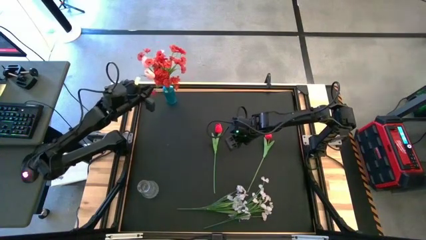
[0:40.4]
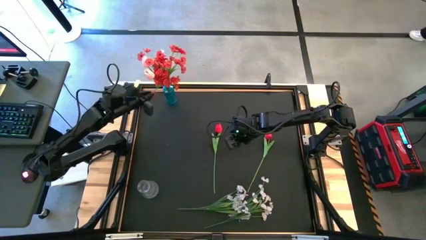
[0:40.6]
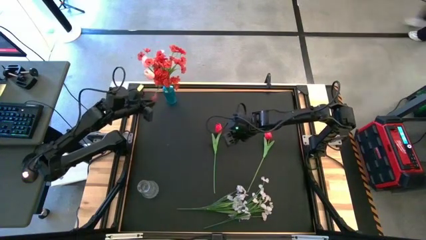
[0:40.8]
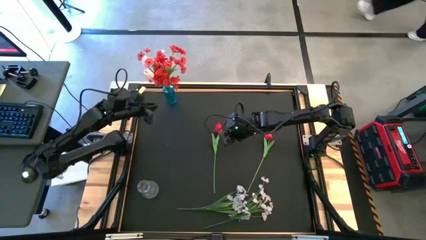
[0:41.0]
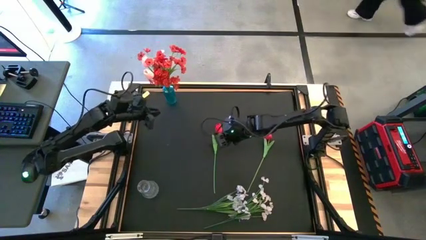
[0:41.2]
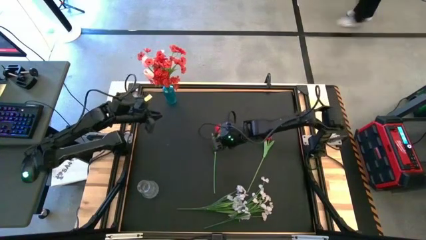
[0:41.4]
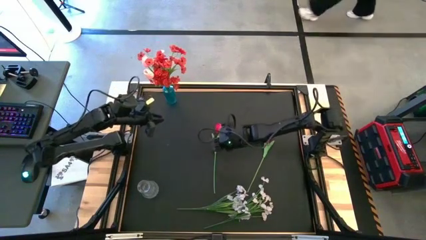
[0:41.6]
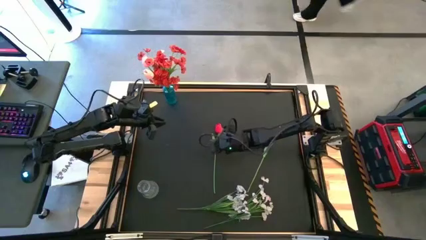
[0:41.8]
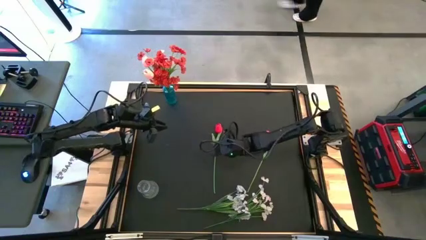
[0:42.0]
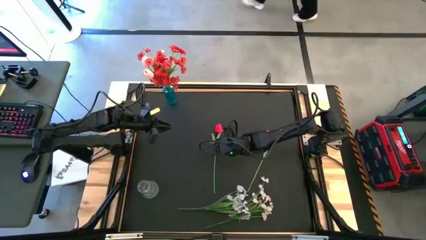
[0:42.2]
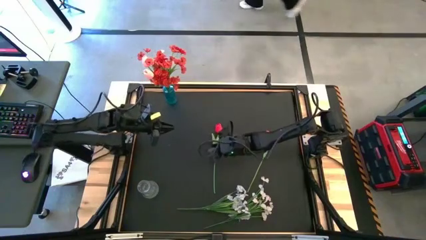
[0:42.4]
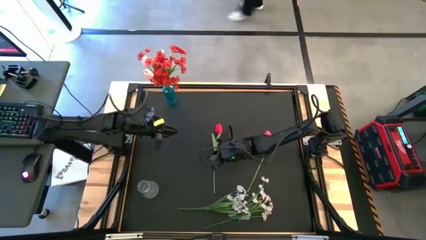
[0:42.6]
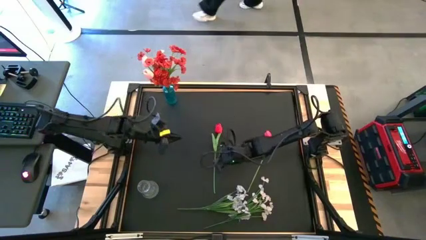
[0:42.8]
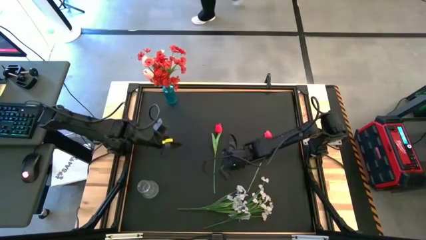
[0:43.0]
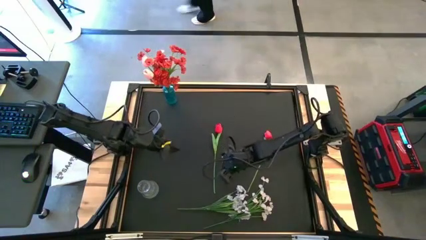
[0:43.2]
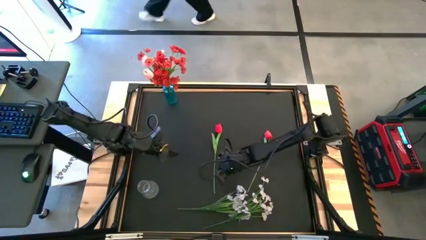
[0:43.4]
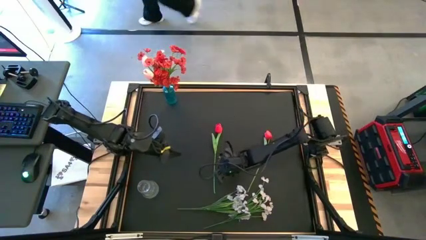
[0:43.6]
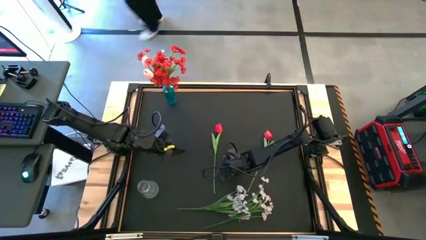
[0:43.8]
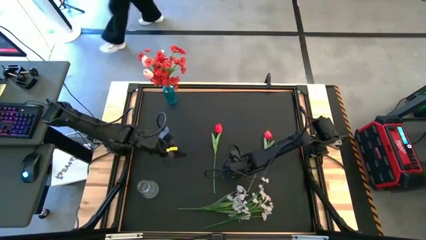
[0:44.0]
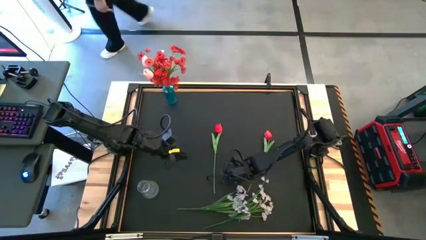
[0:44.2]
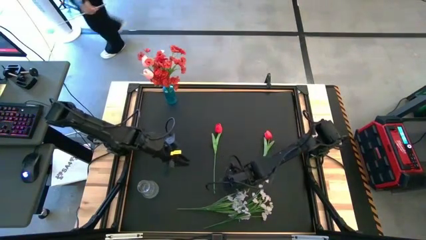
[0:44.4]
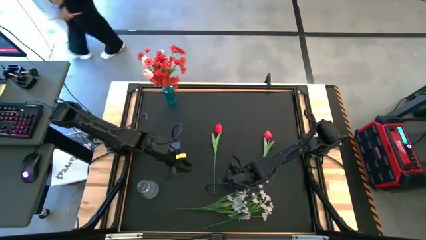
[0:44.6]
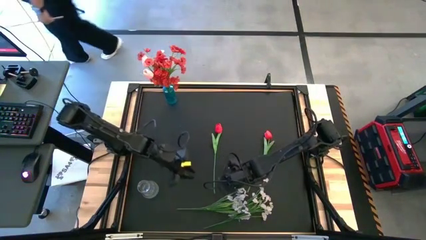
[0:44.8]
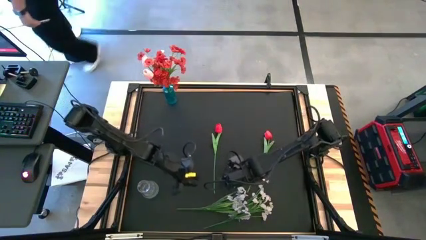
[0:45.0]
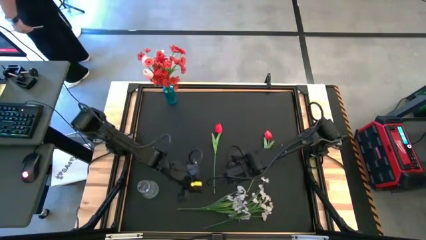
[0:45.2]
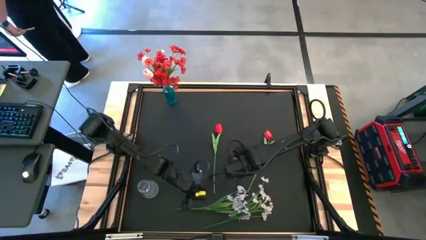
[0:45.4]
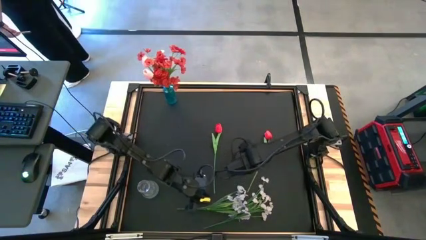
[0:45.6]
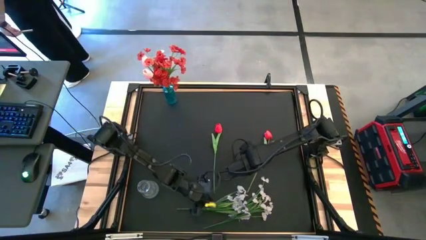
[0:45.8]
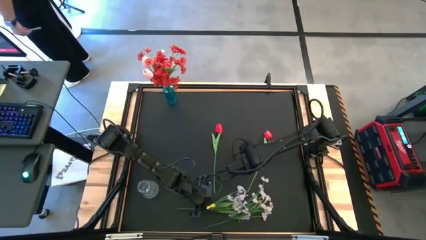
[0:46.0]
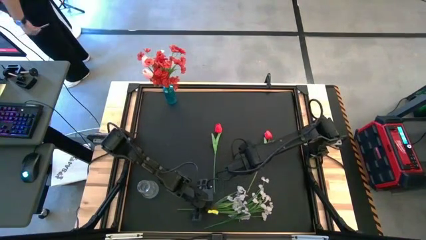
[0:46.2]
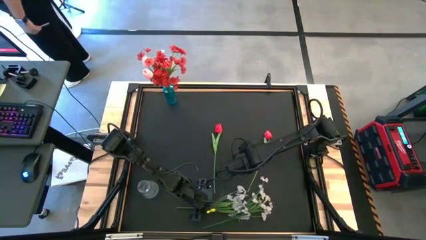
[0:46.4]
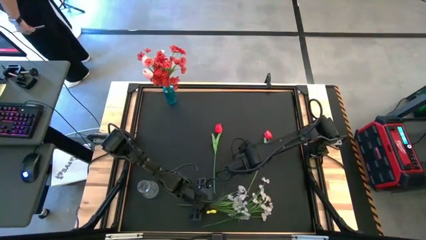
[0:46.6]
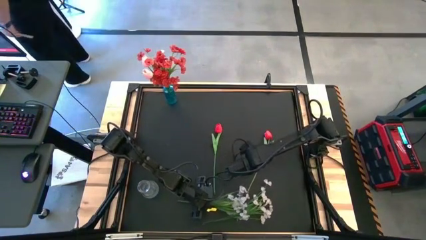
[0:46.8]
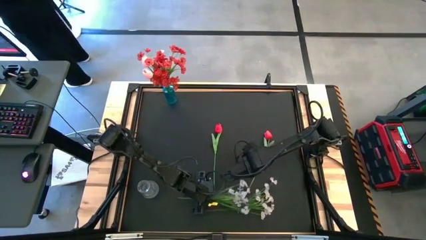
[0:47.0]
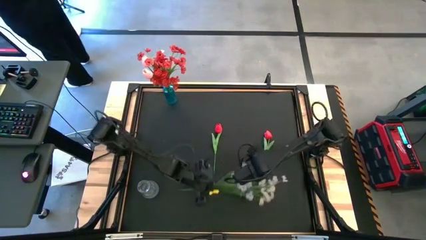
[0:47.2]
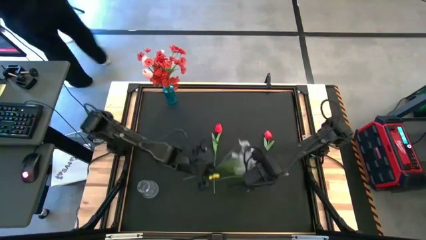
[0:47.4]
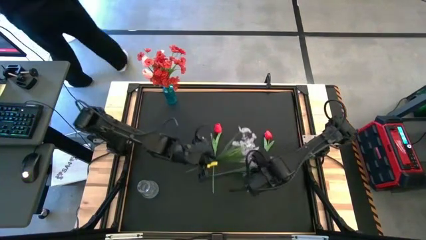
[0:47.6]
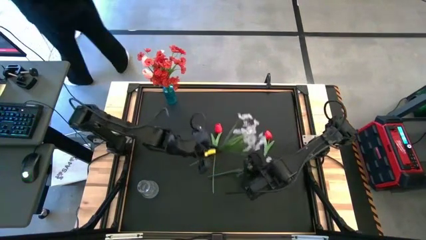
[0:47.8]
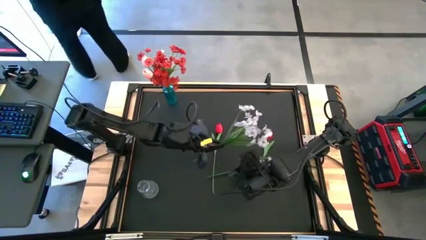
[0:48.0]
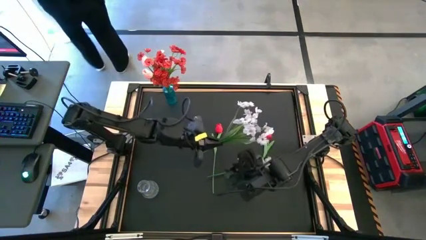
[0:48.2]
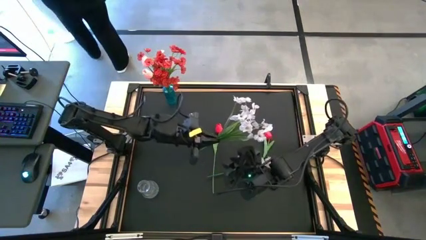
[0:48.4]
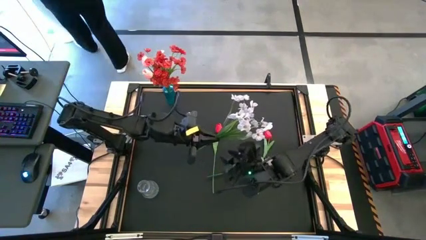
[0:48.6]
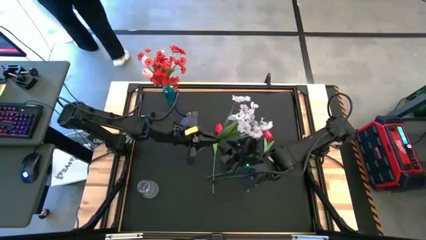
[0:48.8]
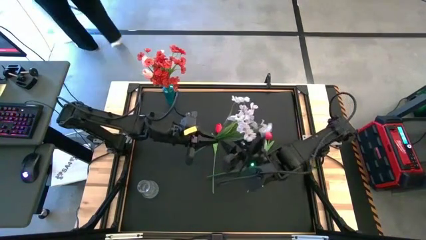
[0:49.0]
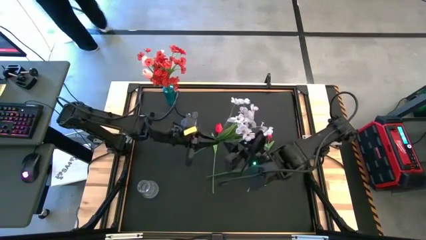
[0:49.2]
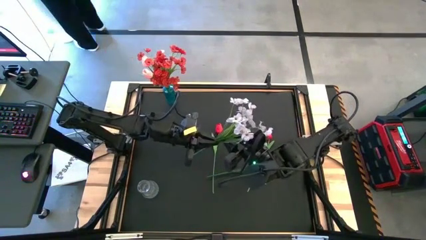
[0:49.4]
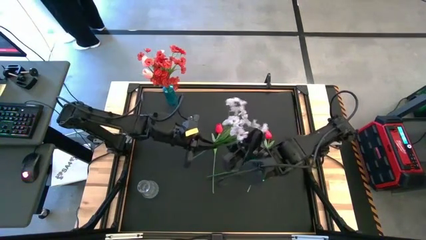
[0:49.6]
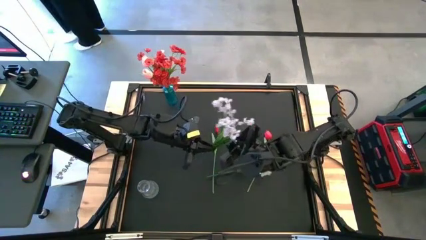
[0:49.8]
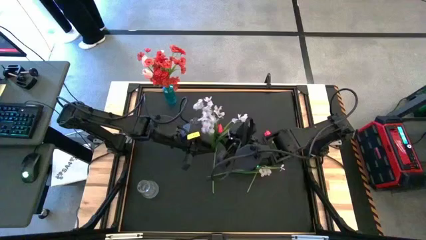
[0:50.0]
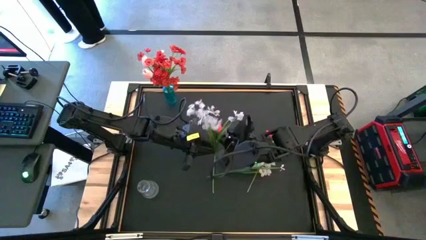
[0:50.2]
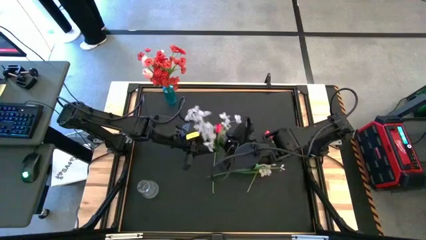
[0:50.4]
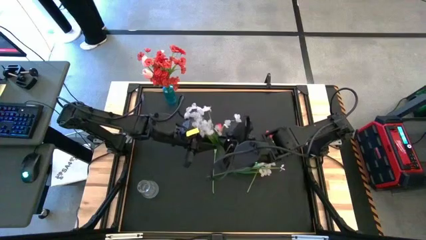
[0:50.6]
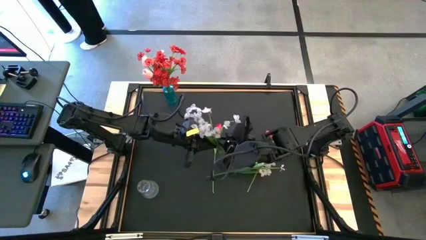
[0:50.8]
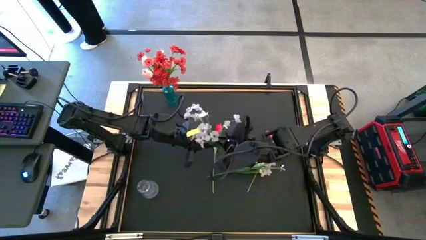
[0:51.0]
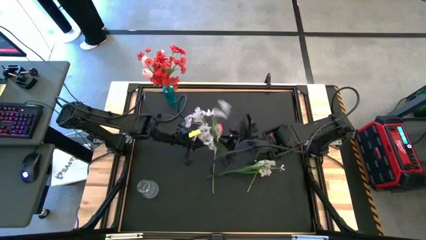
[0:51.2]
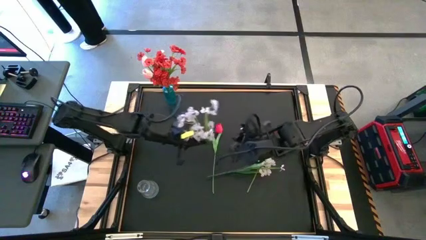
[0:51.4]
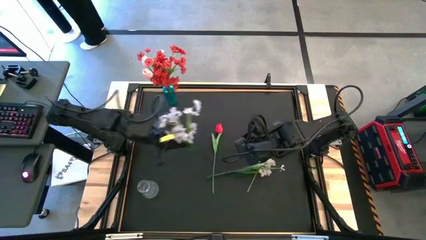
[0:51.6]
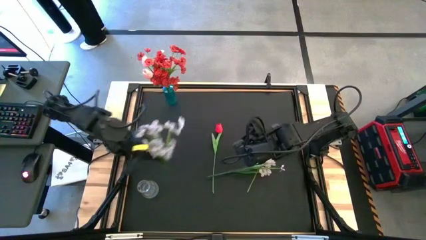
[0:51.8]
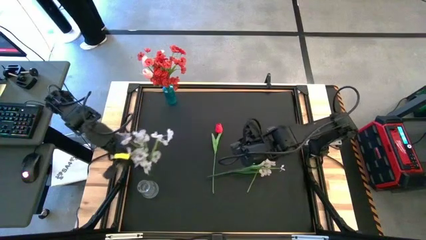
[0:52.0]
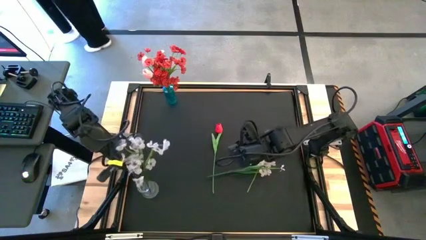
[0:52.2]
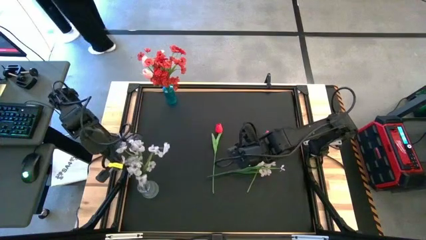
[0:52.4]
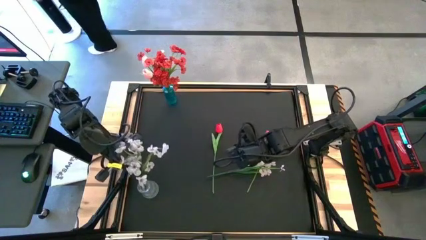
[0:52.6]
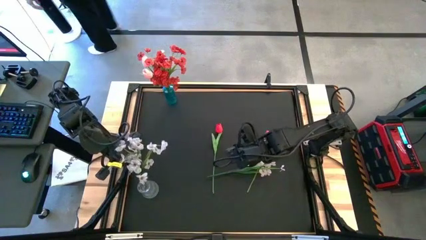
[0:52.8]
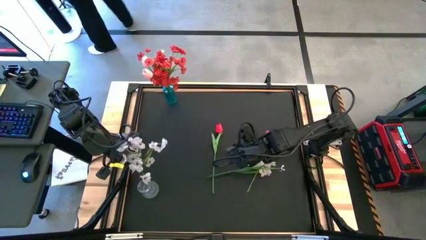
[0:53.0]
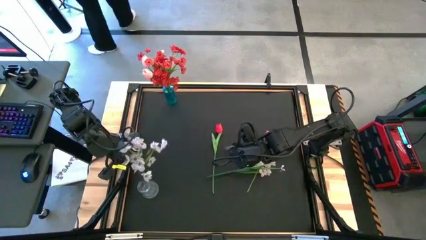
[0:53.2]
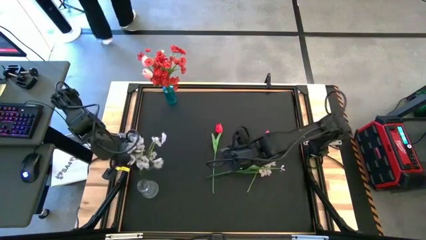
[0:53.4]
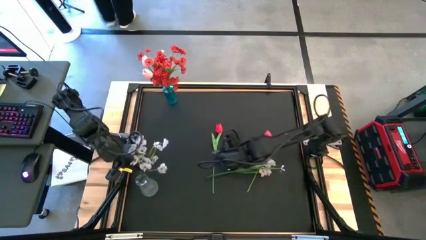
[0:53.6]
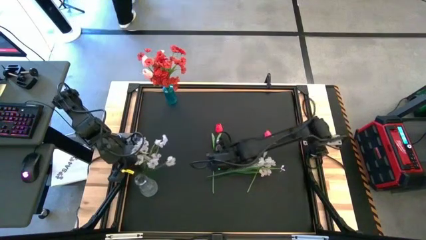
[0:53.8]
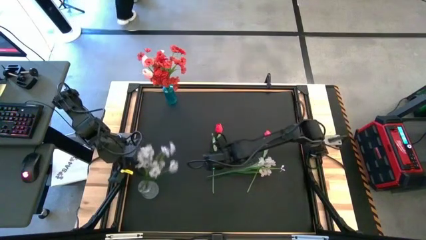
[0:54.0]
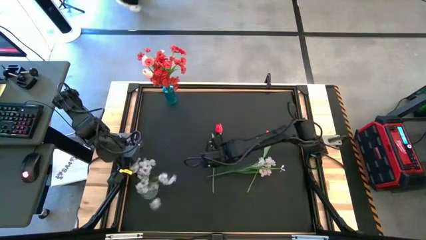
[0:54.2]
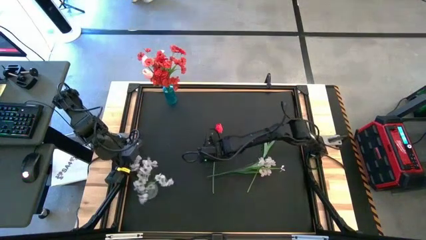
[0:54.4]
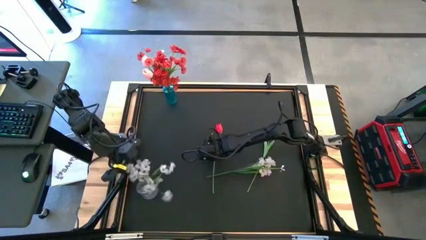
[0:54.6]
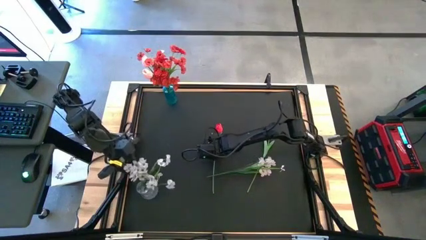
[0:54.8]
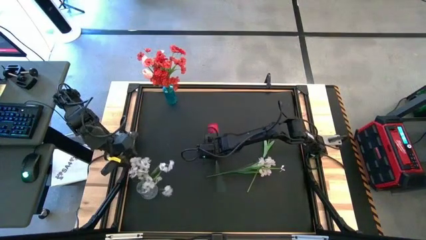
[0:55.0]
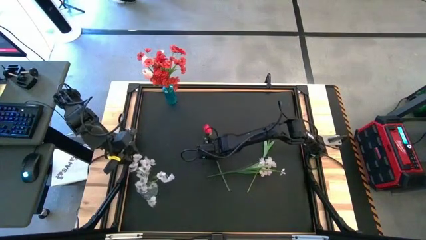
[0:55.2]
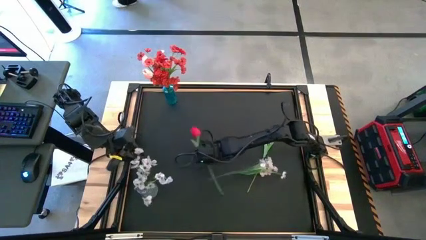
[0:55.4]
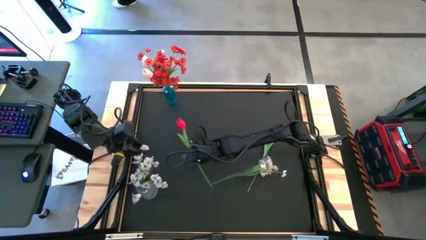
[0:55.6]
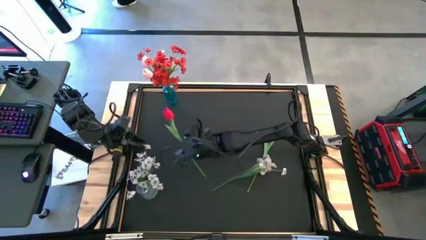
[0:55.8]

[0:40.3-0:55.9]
Task: Sort flowers into vase by color
Put the right white flowers into the transparent vase
